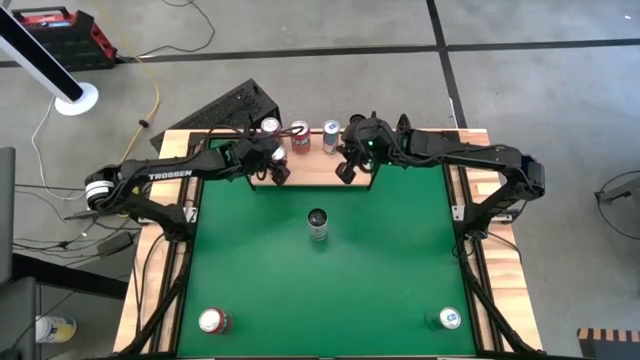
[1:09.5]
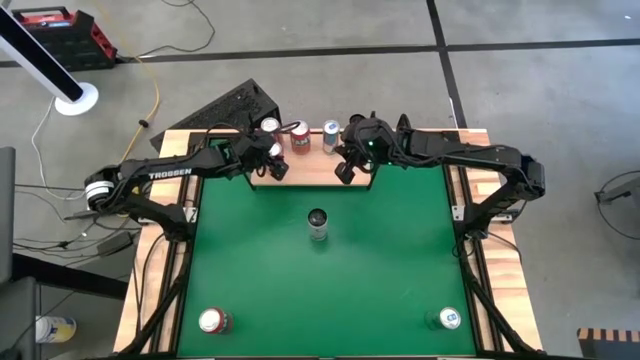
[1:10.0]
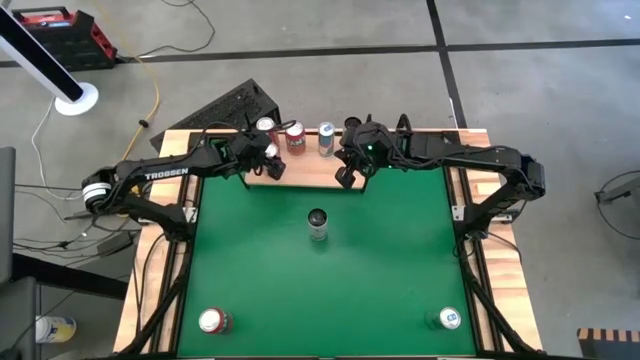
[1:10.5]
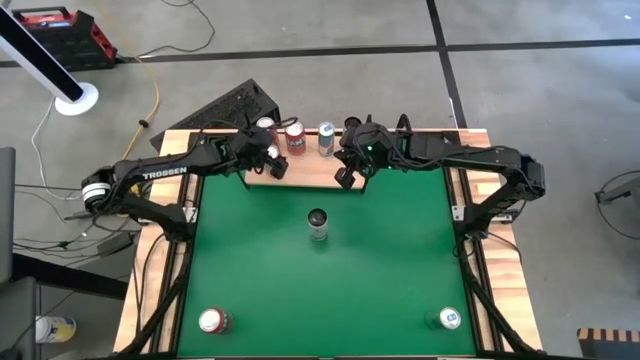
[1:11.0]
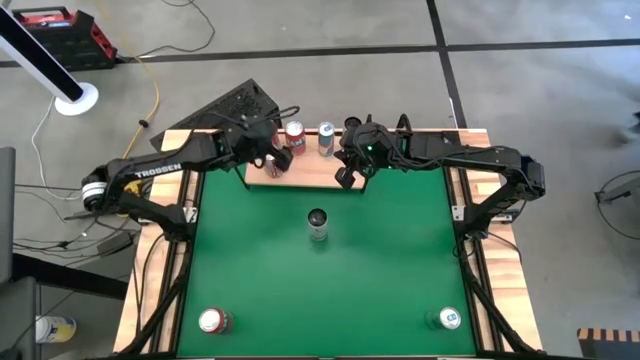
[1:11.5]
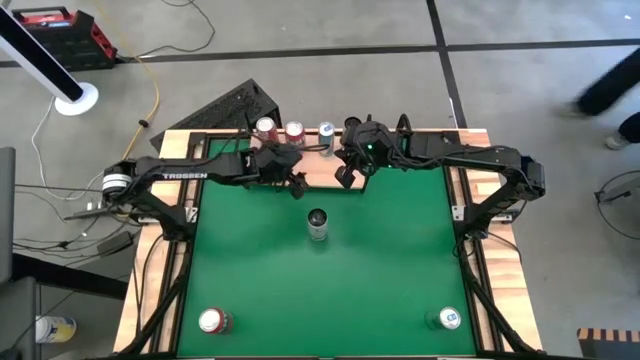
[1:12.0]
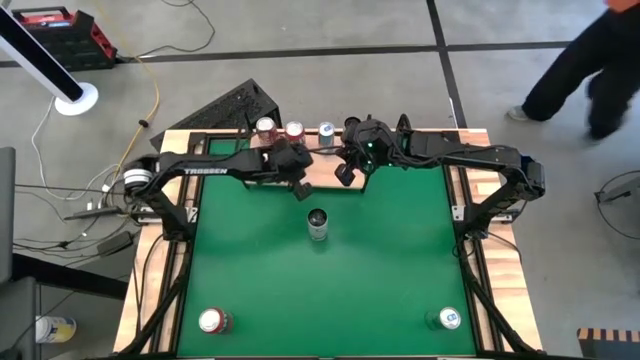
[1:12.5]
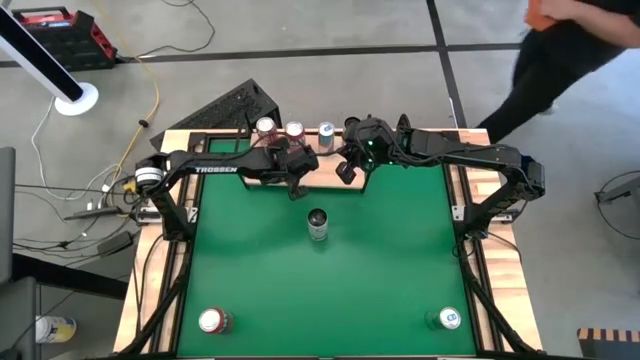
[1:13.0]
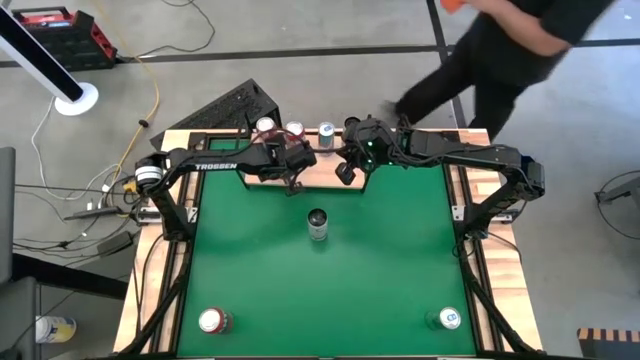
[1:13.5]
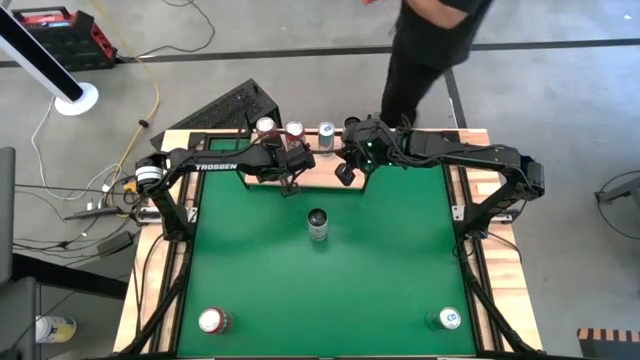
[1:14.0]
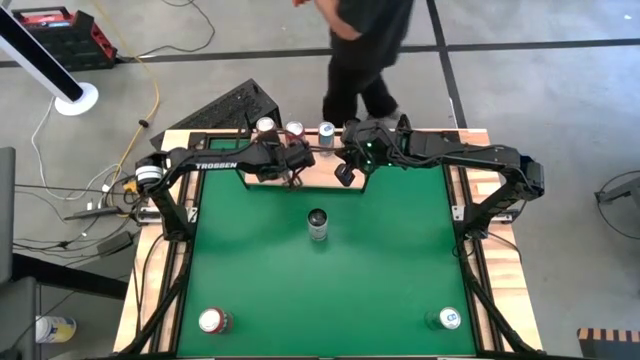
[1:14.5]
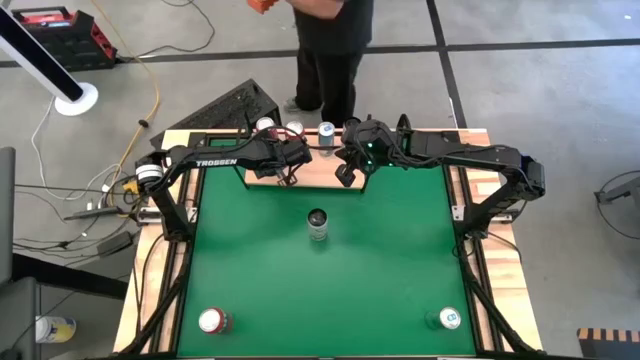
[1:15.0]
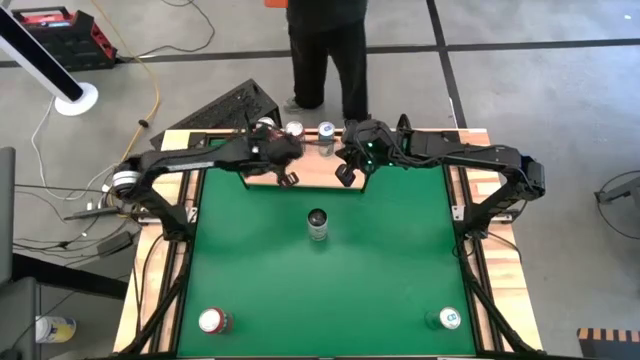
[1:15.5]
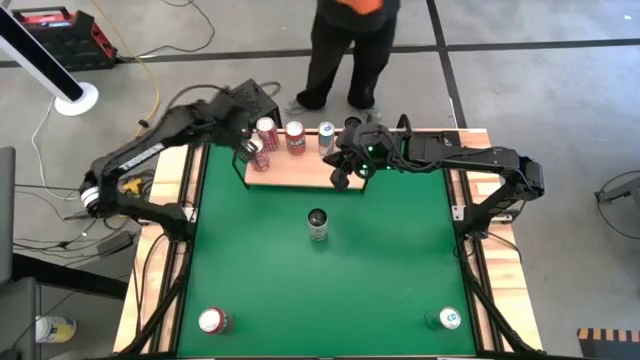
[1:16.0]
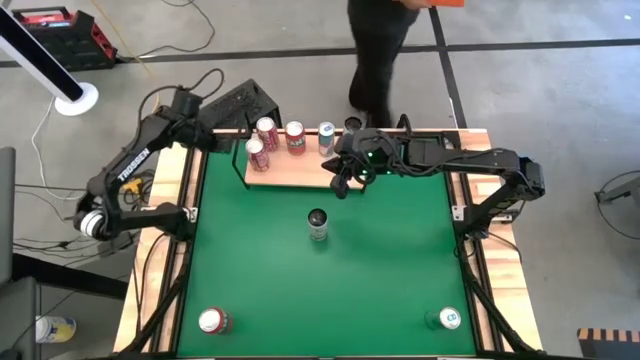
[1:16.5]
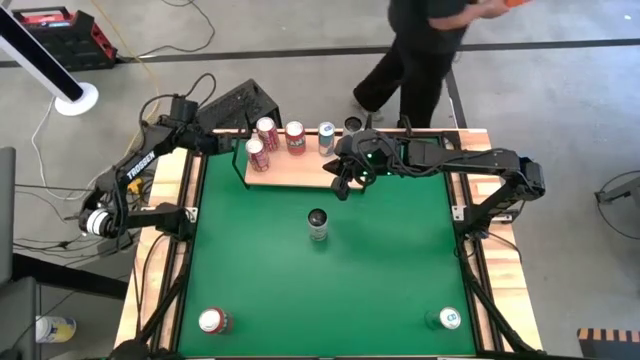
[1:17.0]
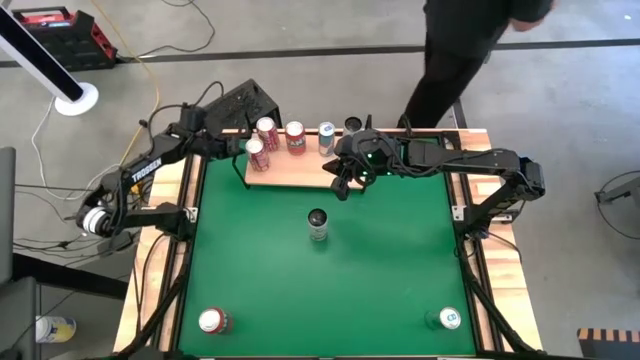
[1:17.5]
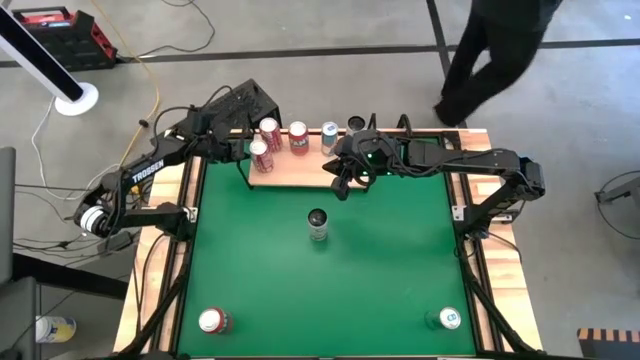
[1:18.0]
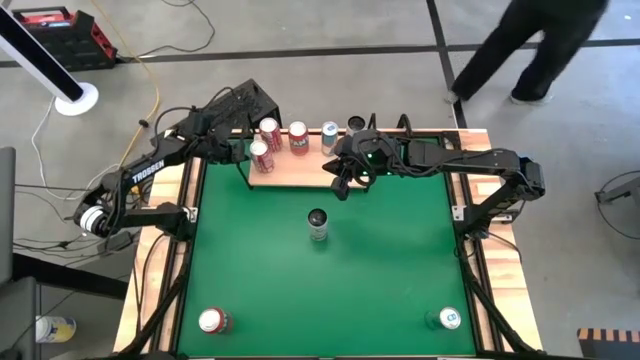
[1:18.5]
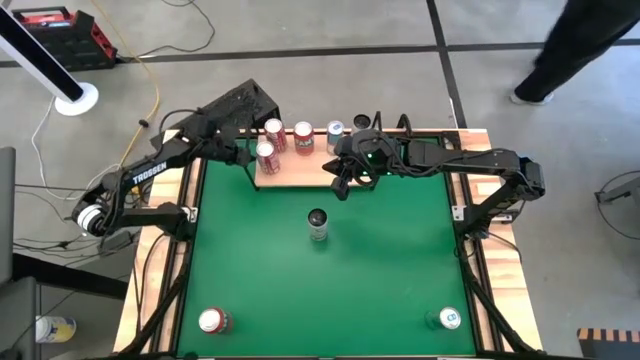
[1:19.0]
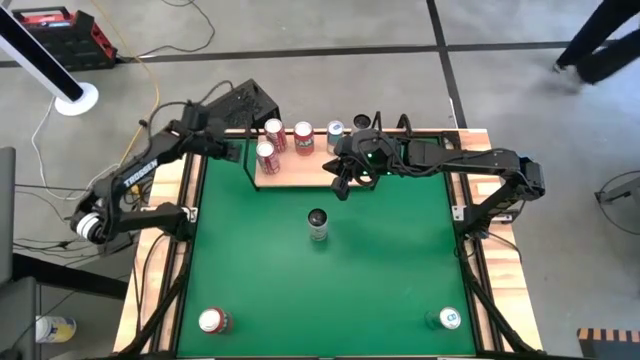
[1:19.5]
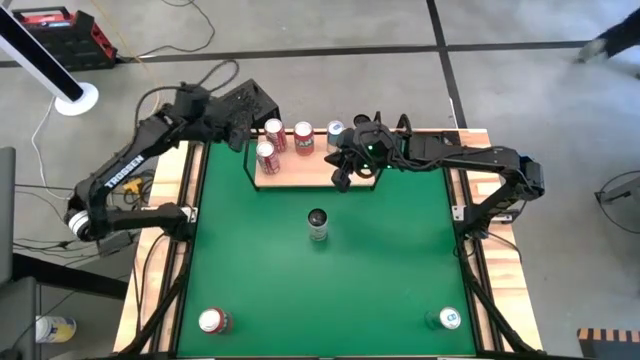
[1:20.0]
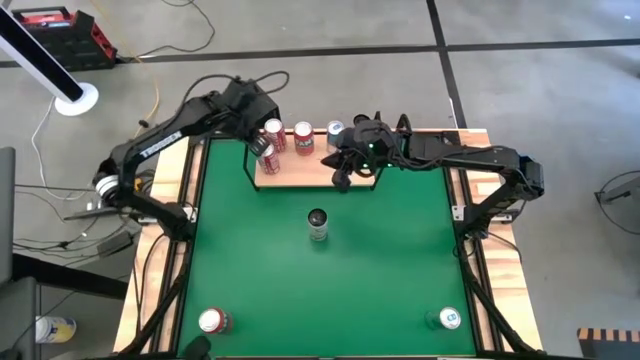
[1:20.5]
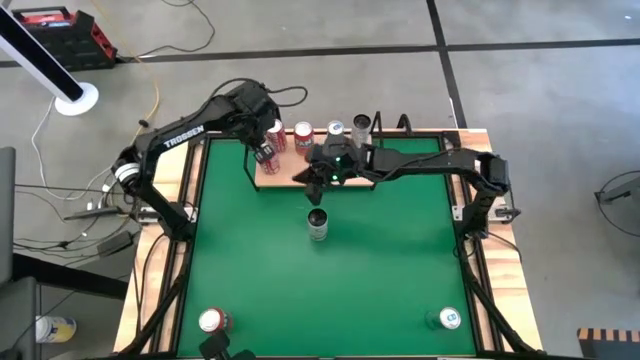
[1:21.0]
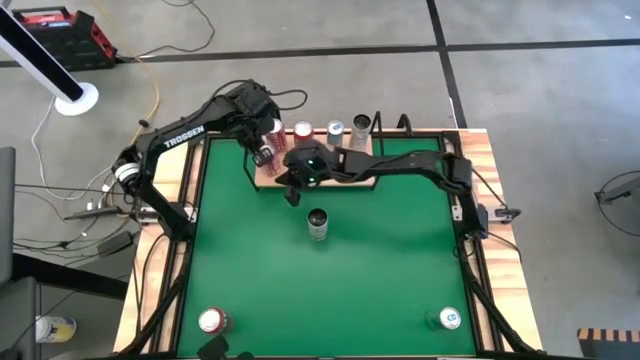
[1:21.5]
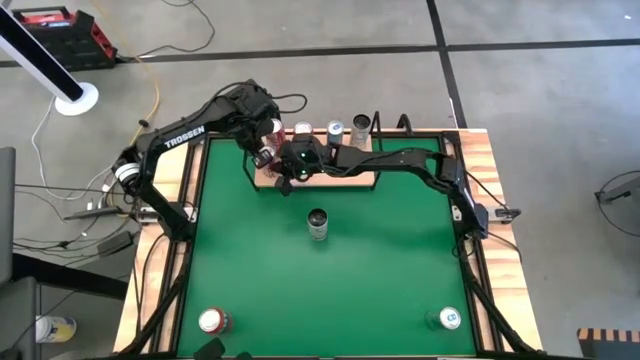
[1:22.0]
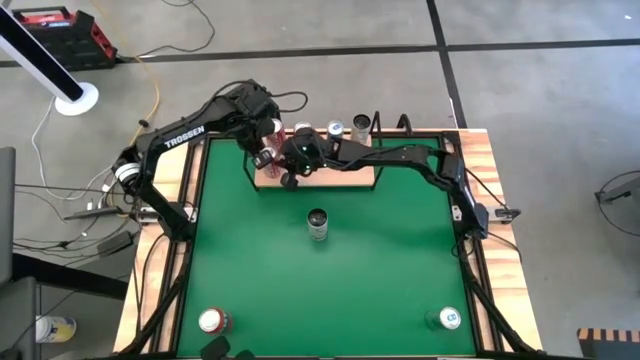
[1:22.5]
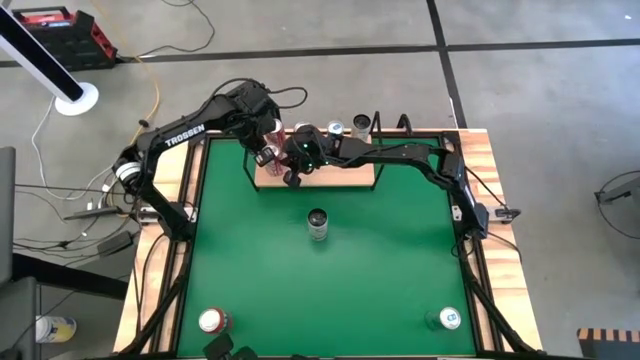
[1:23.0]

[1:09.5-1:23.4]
Task: Place canned beverage on shelf
Put the red-white soda can on the shelf aligned with the other red-white soda can

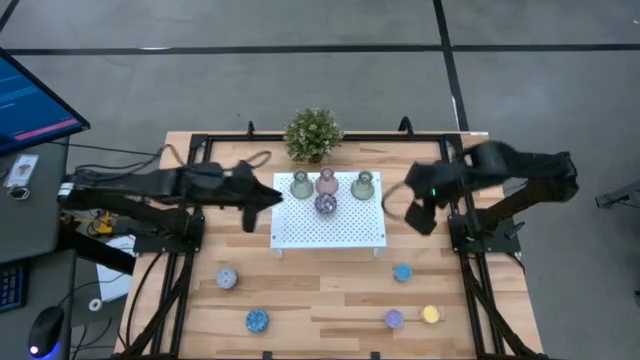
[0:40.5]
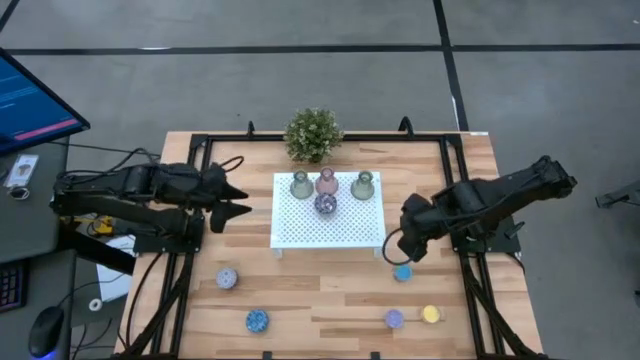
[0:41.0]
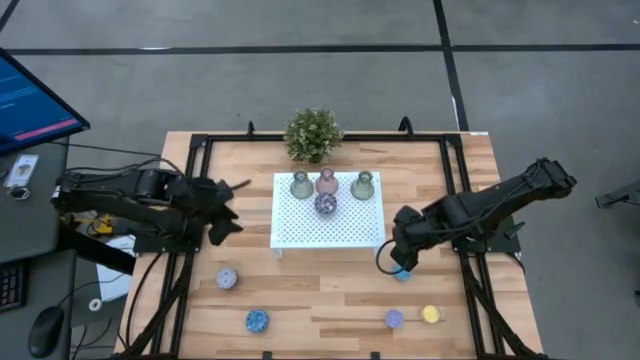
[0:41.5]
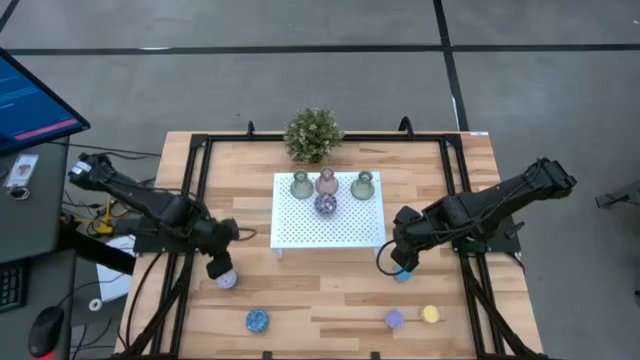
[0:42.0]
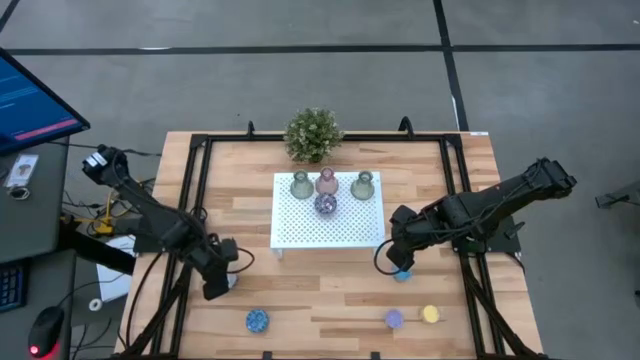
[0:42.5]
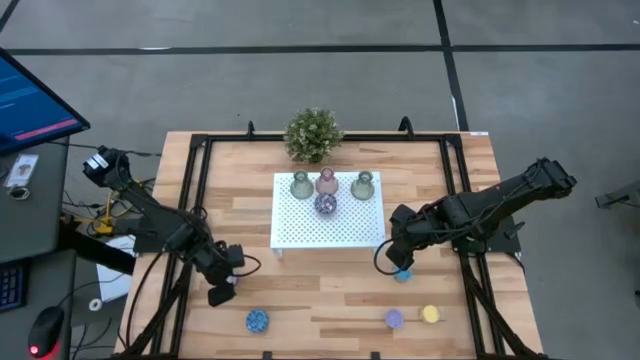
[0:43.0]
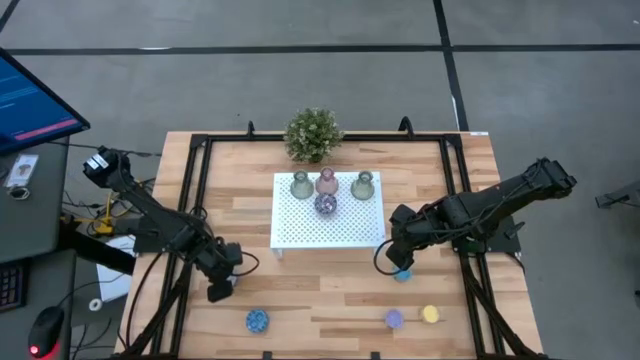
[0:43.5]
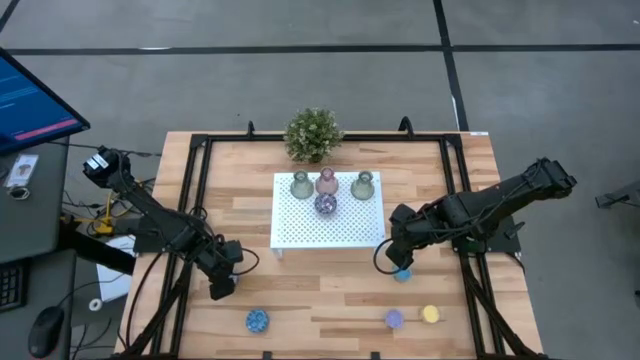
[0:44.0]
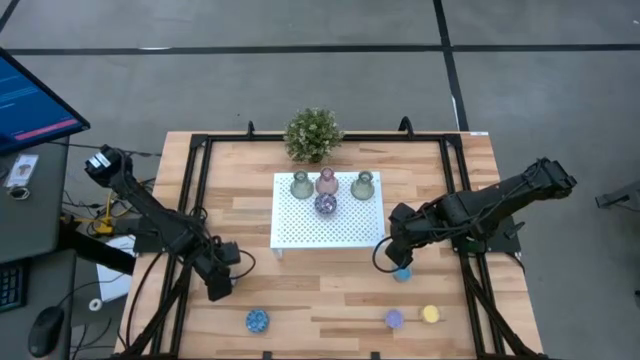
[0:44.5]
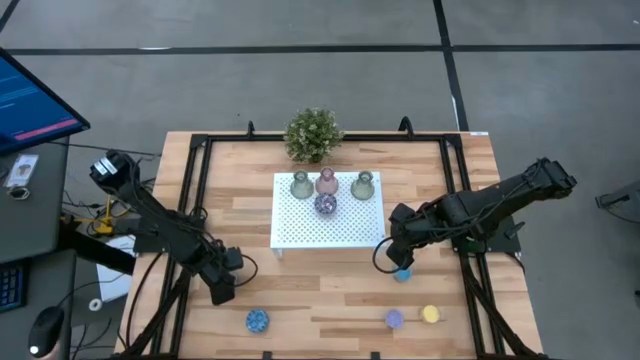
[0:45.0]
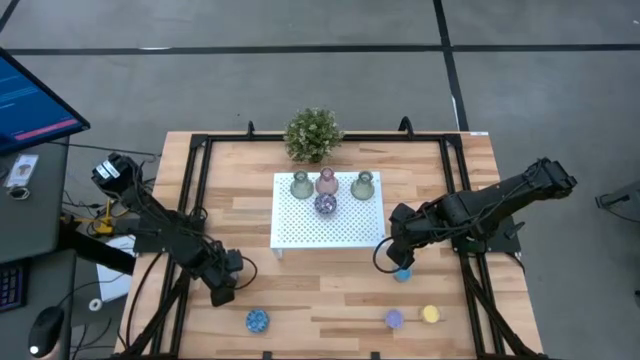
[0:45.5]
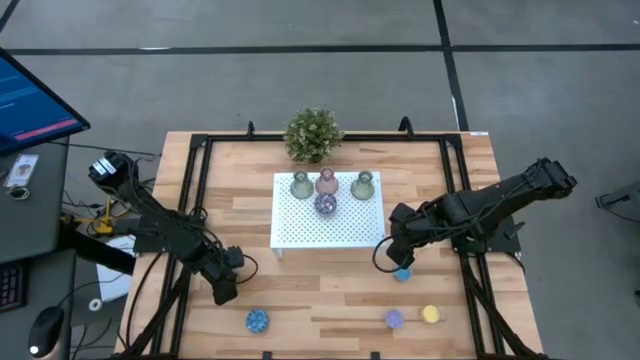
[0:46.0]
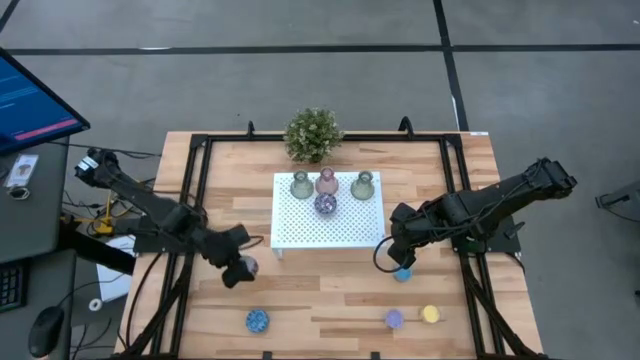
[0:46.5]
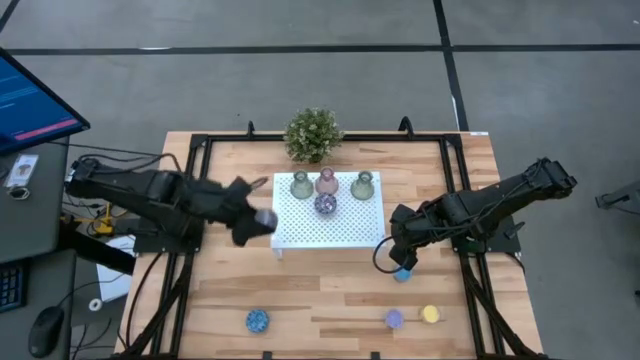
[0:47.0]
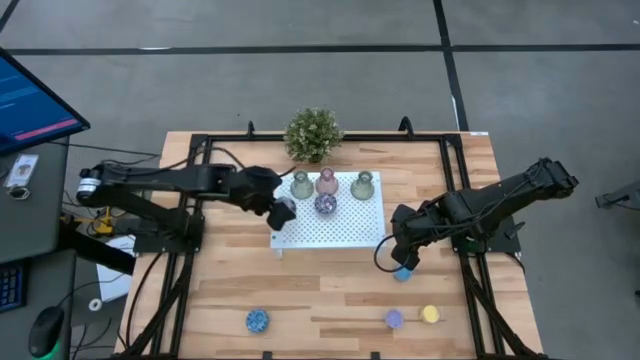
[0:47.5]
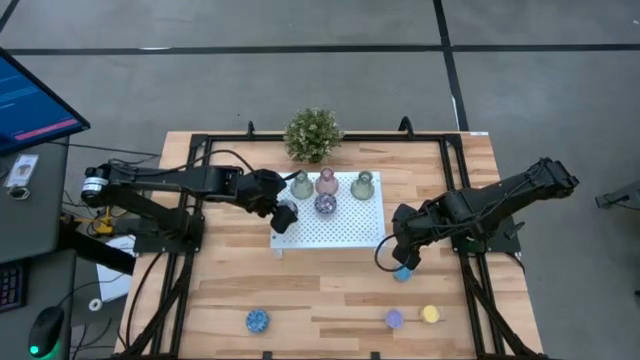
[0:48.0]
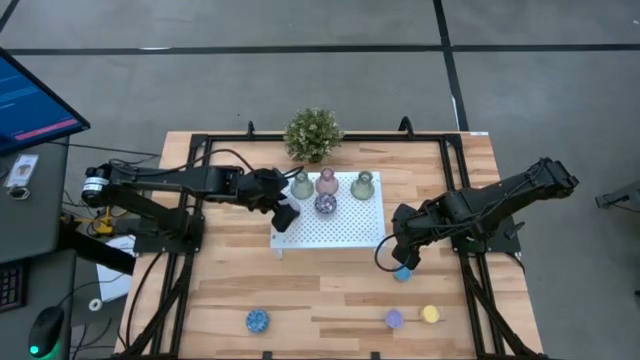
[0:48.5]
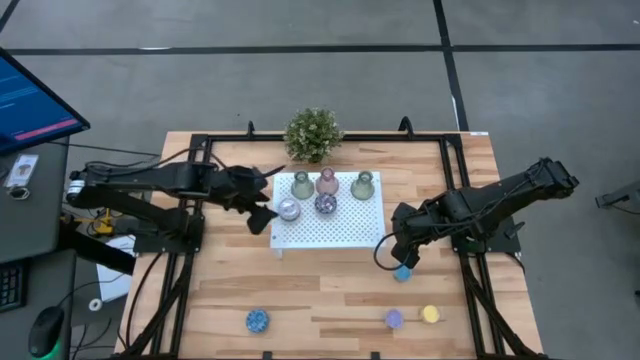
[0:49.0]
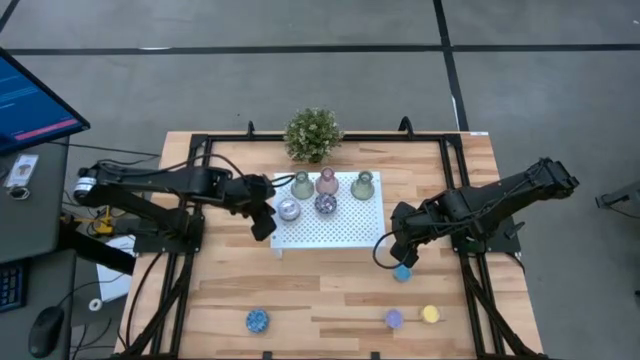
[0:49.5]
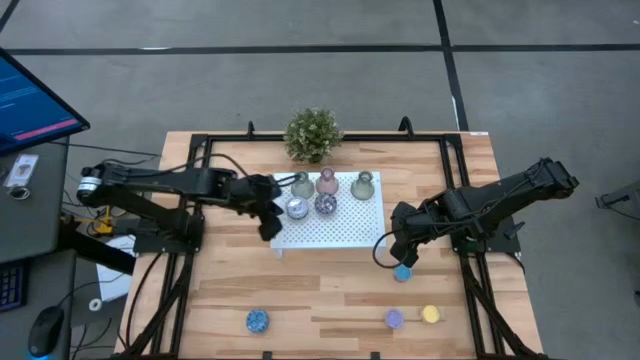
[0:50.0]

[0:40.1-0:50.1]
Task: Pick & Place candle stick holders
Put the white patterned scented candle on the shelf
